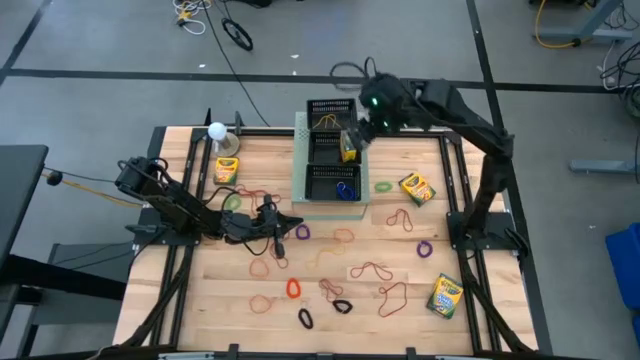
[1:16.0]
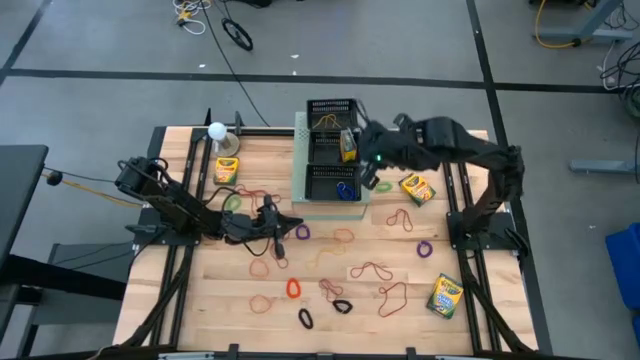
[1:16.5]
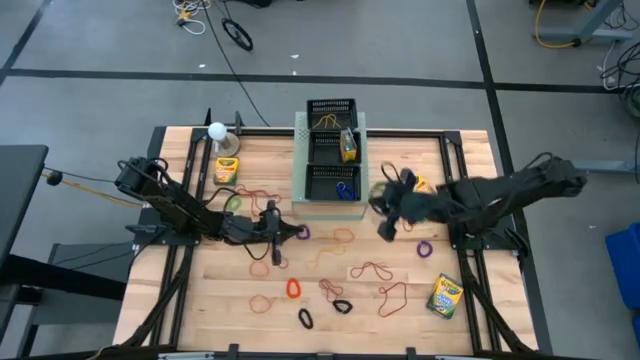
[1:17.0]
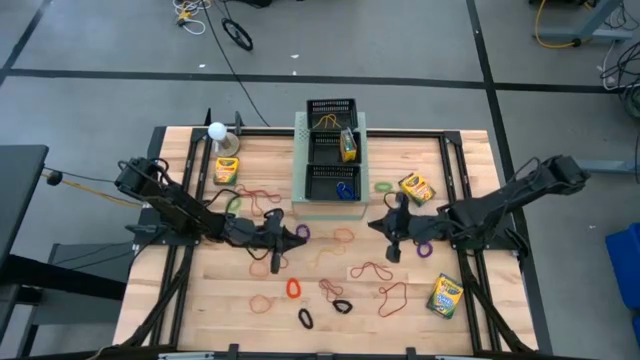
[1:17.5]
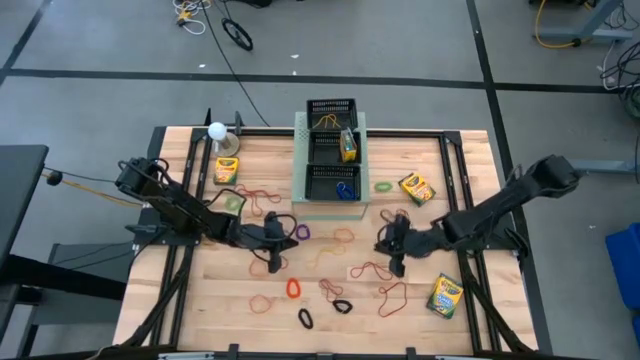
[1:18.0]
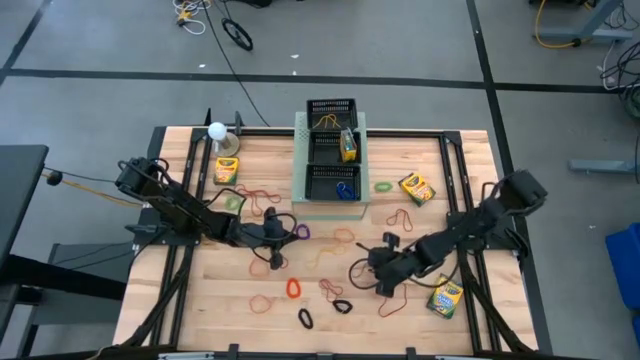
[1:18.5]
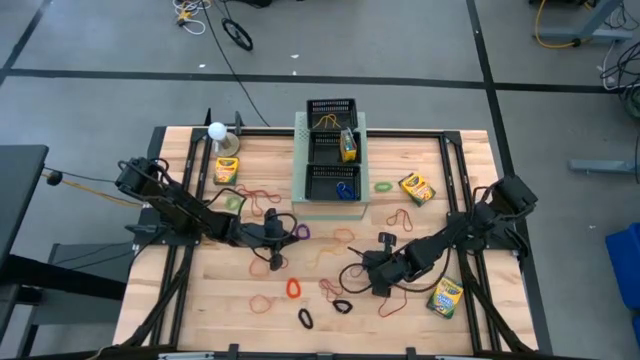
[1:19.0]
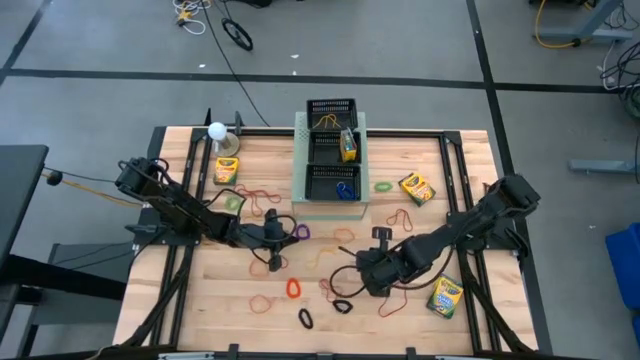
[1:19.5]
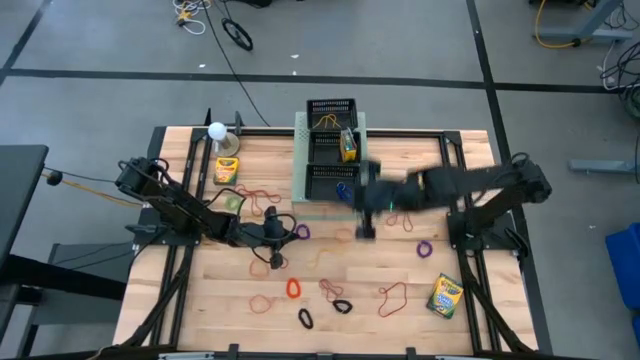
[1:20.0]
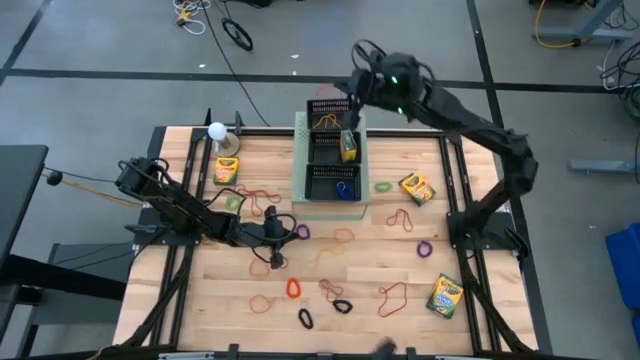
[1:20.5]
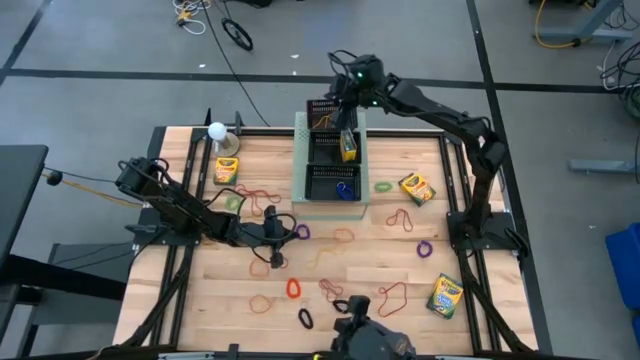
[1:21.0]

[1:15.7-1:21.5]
Task: Pick & Place Office Desk Supplies
Put the red rubber band into the top black bin on the shelf

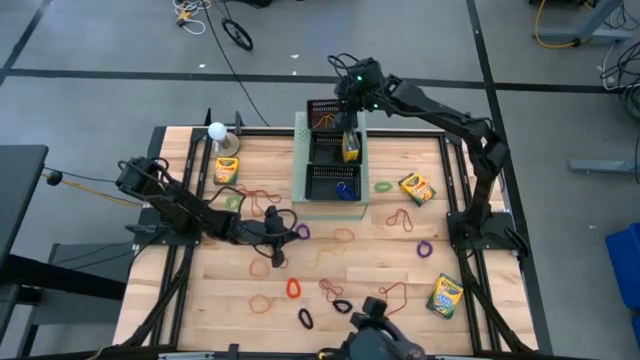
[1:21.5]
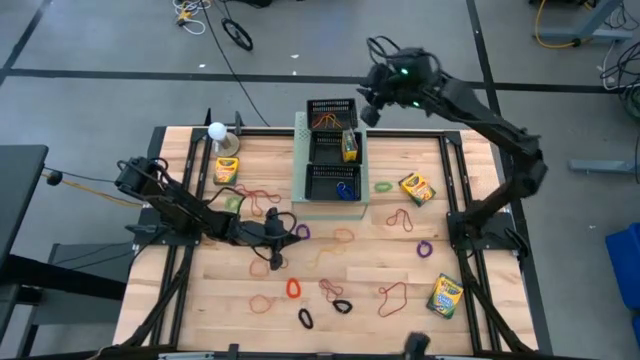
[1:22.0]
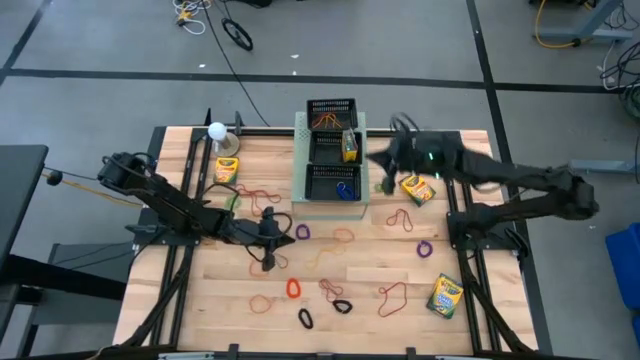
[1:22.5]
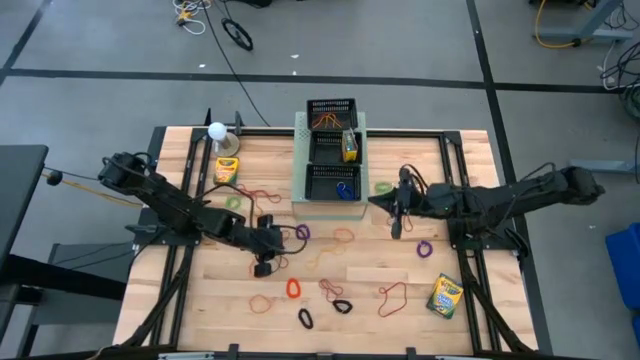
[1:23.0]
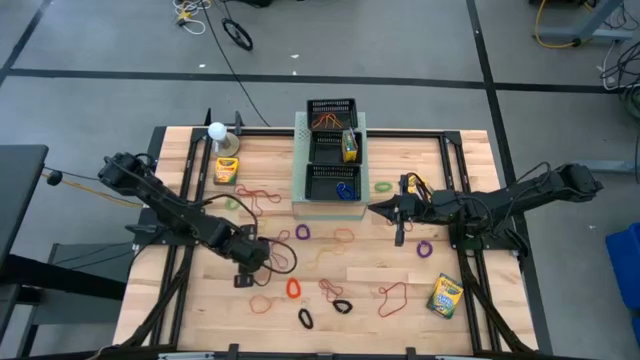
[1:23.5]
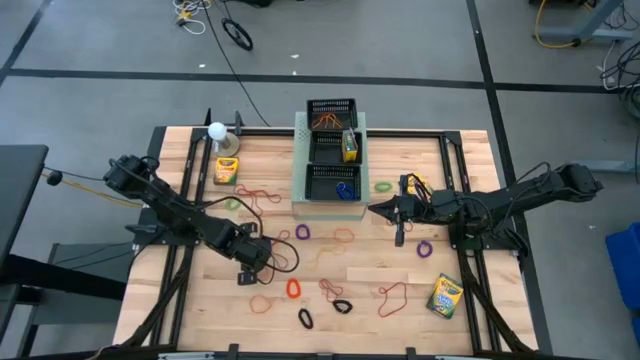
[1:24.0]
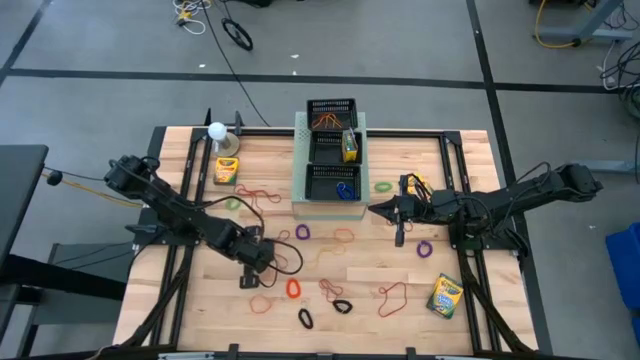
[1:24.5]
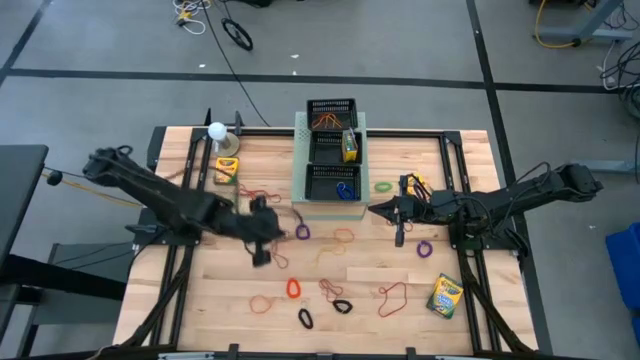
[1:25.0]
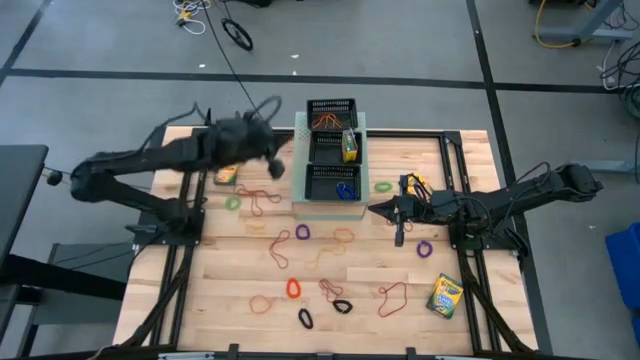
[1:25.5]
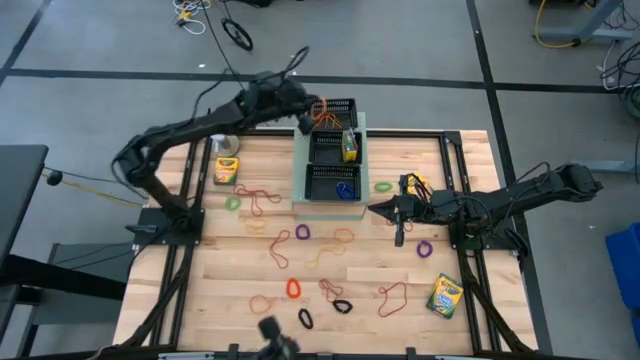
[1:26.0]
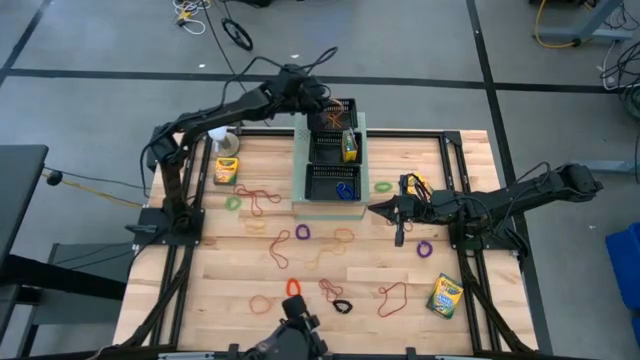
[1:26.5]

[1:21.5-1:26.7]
Put the middle orange rubber band into the top black bin on the shelf

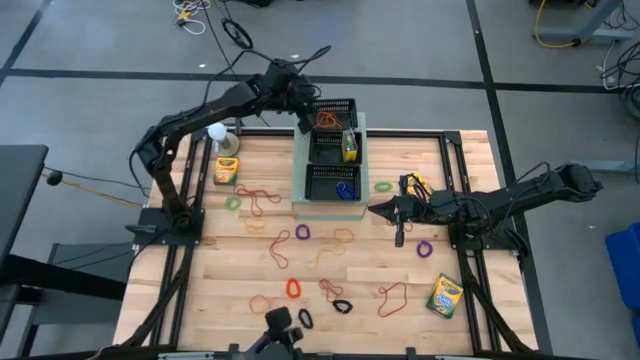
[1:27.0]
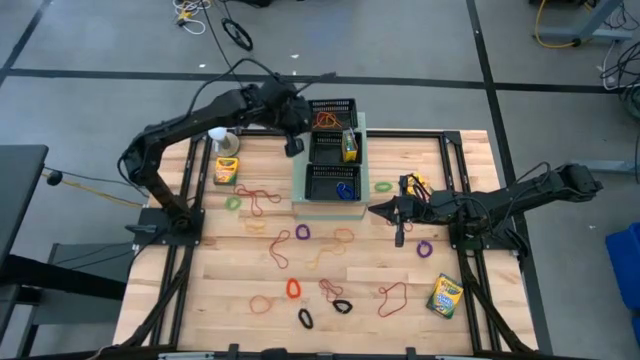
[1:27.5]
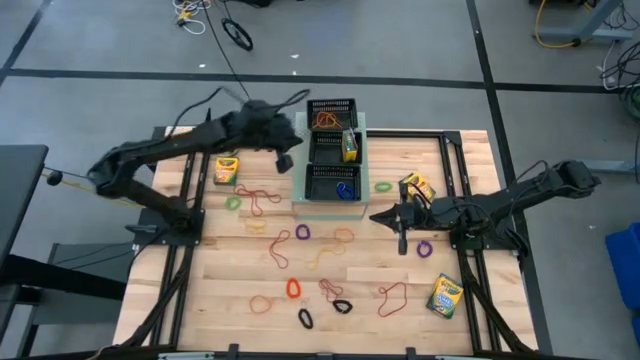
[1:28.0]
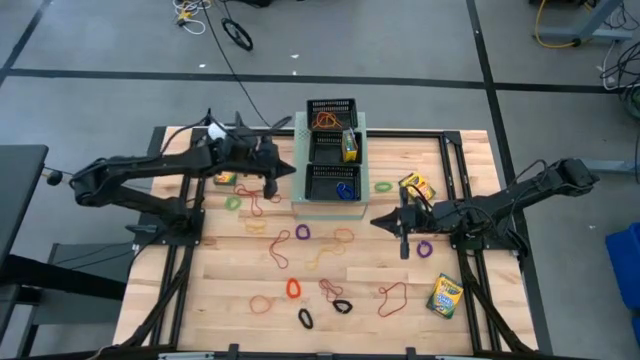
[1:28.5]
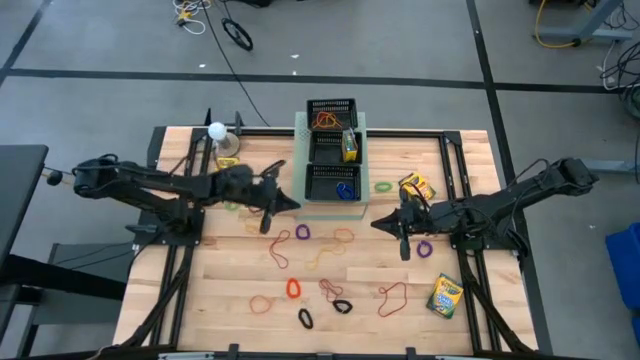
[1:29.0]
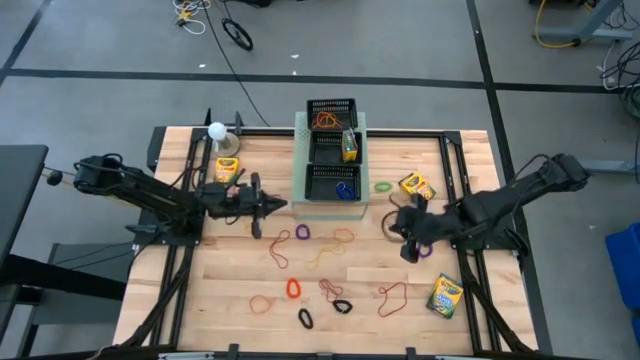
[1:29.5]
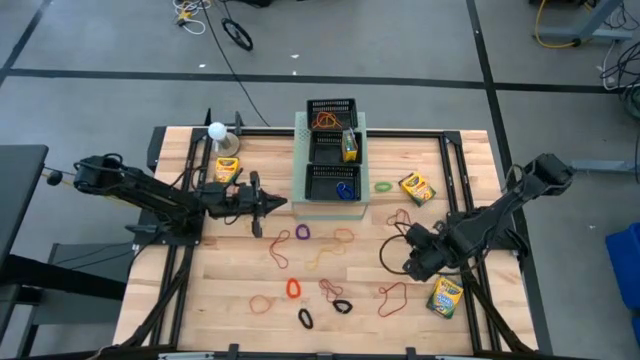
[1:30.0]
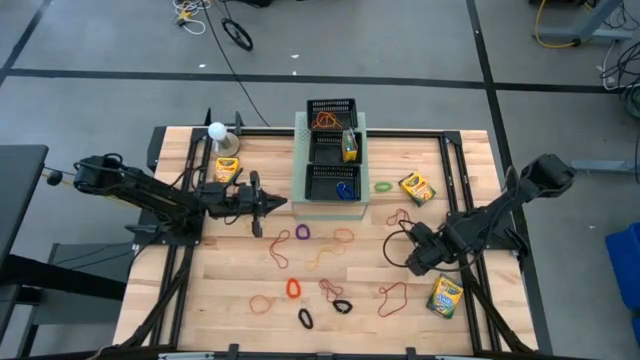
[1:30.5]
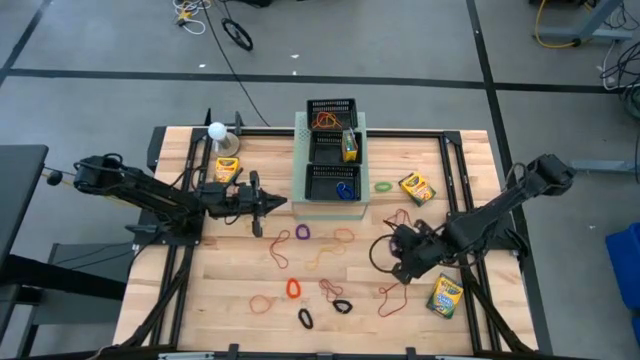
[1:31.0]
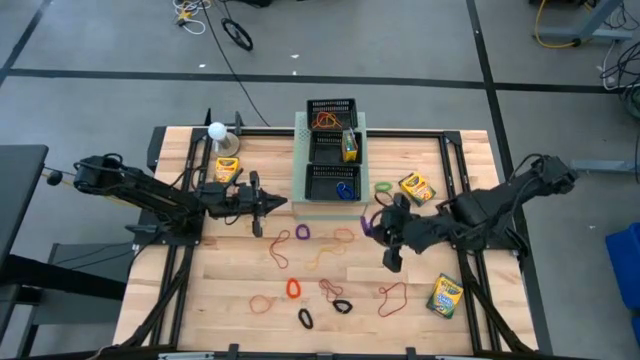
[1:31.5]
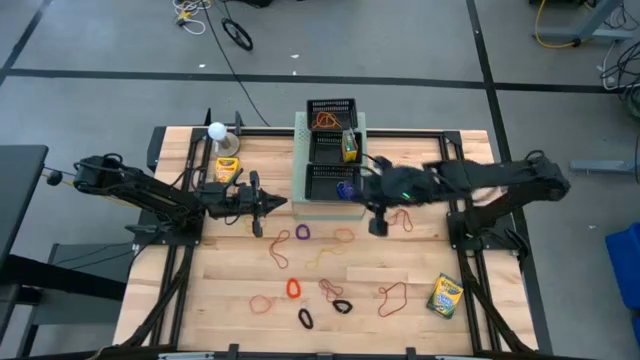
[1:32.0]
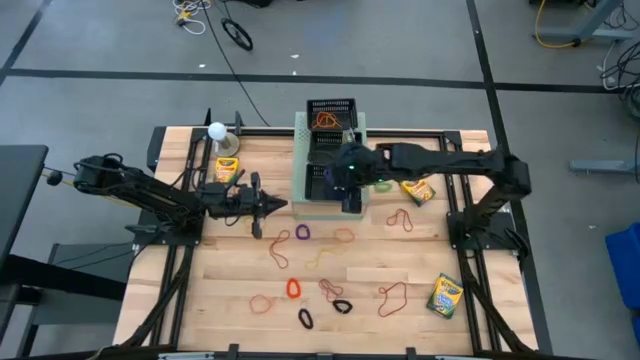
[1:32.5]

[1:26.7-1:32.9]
Put the right violet spring keychain into the bottom black bin on the shelf

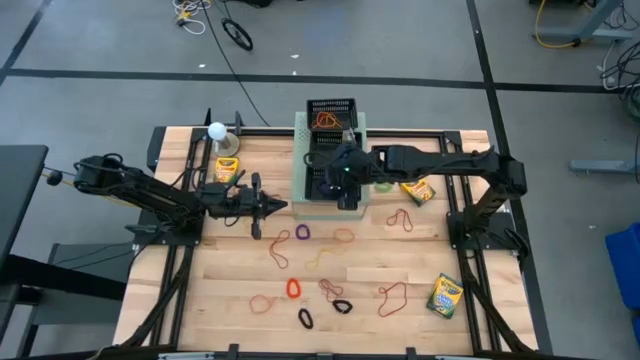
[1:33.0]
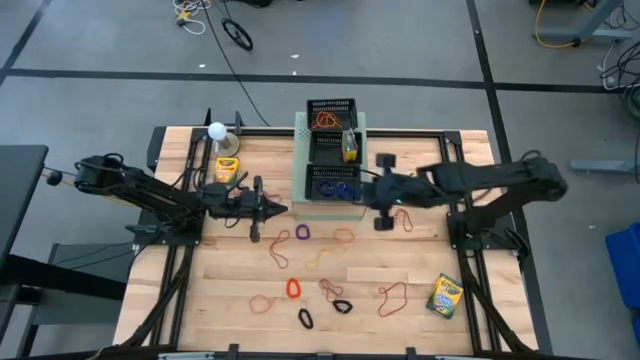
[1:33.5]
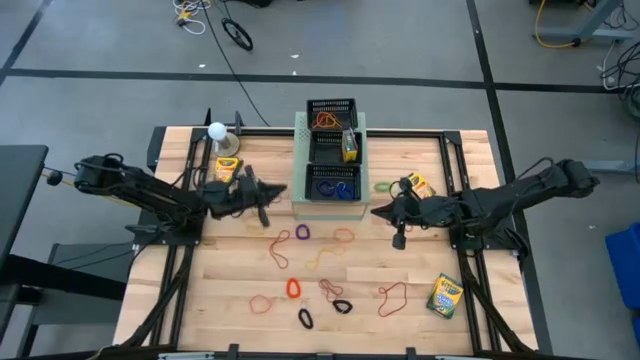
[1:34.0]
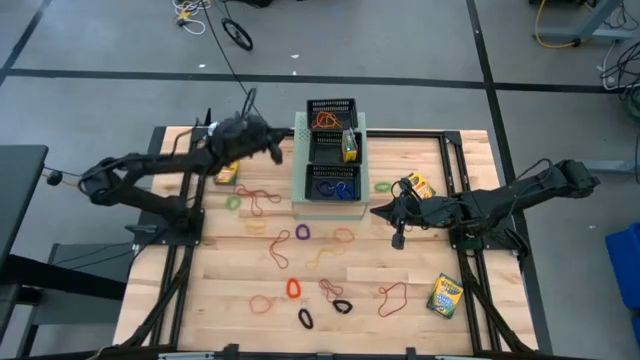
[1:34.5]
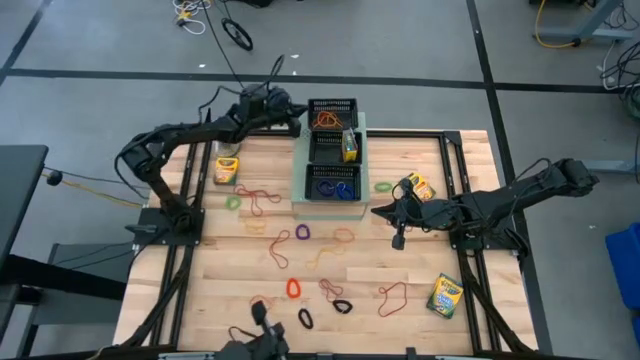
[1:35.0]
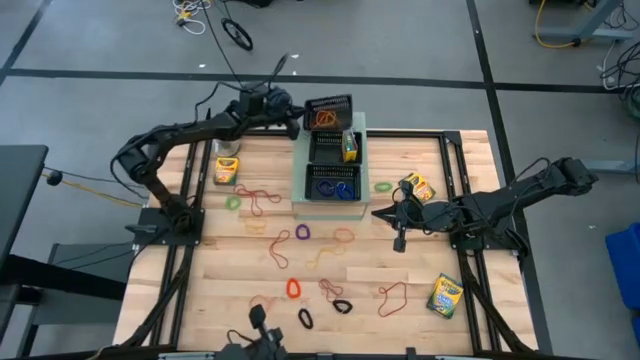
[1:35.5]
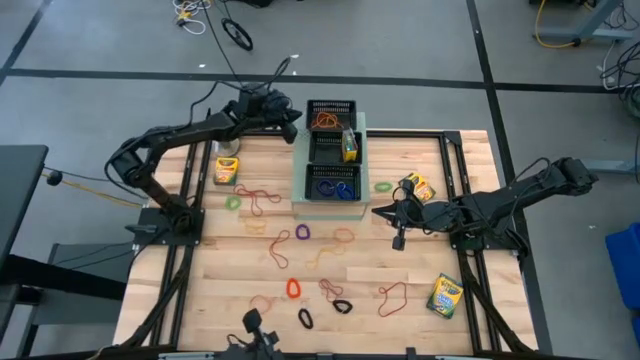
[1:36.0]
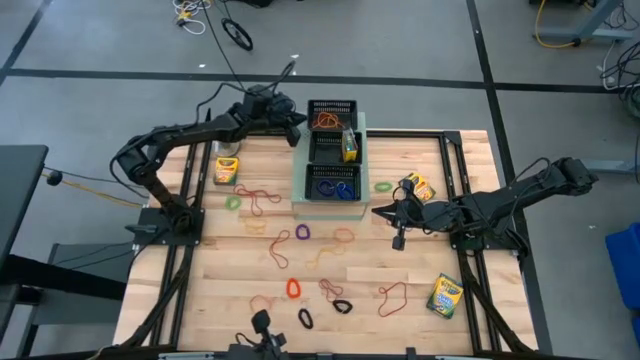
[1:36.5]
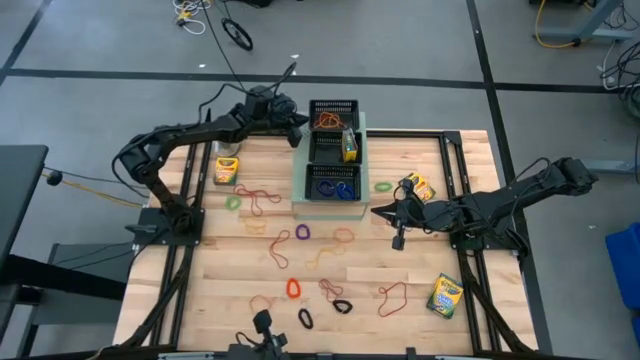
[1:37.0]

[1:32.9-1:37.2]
Adjust the top black bin on the shelf
